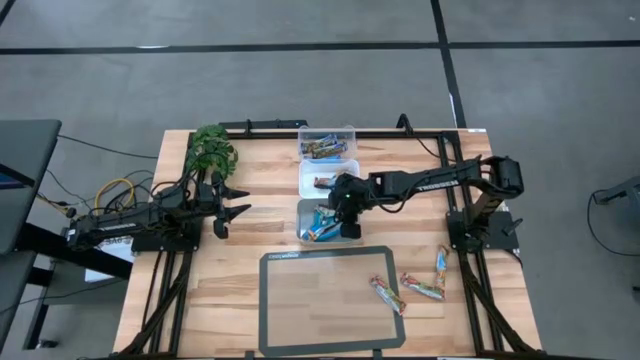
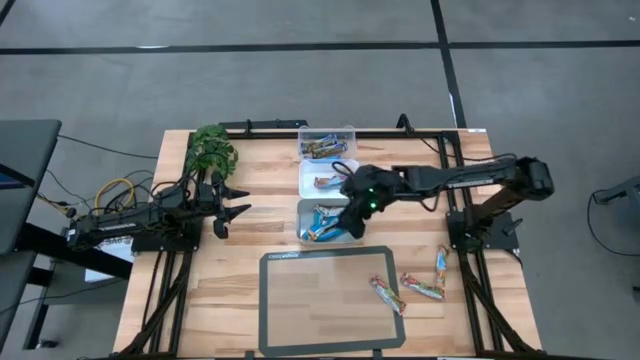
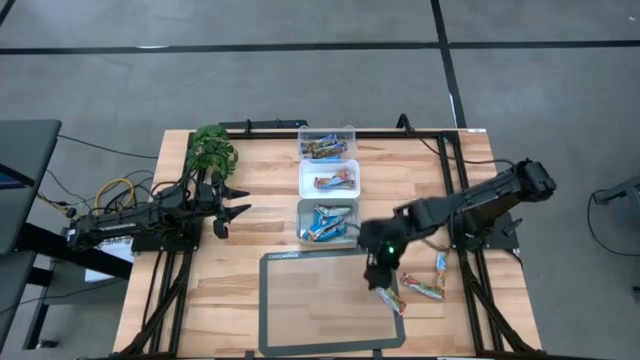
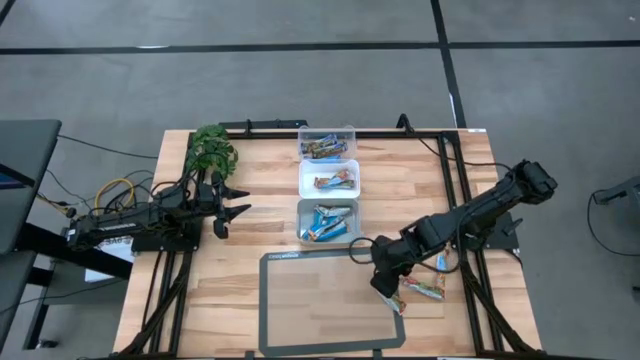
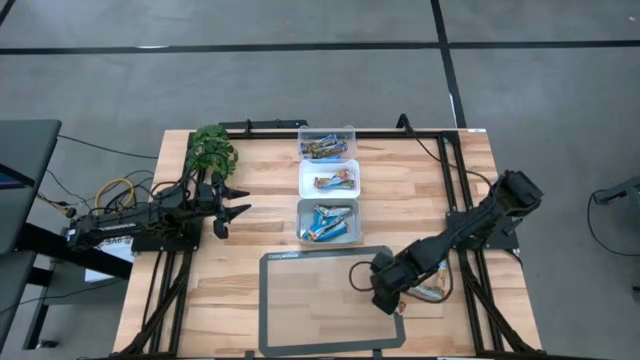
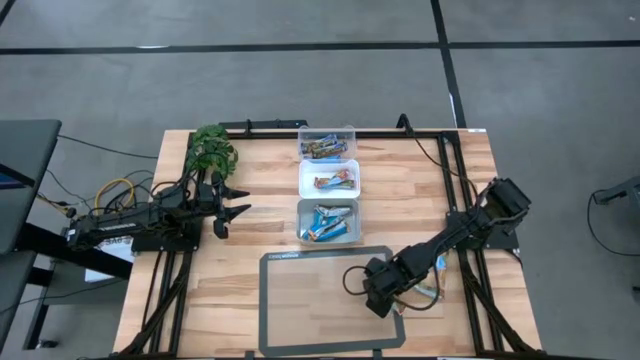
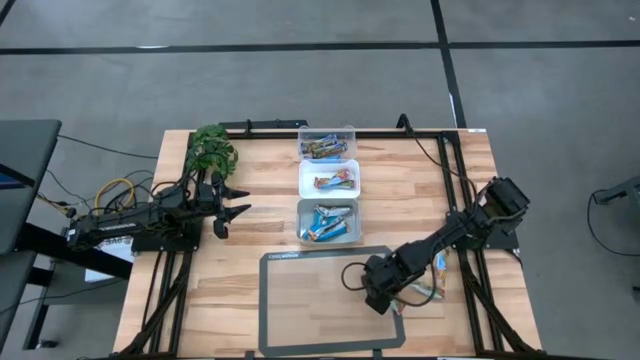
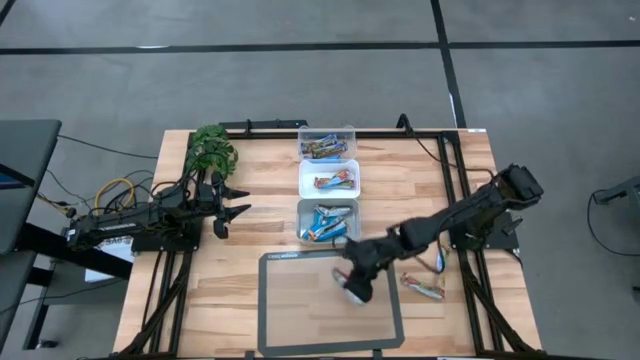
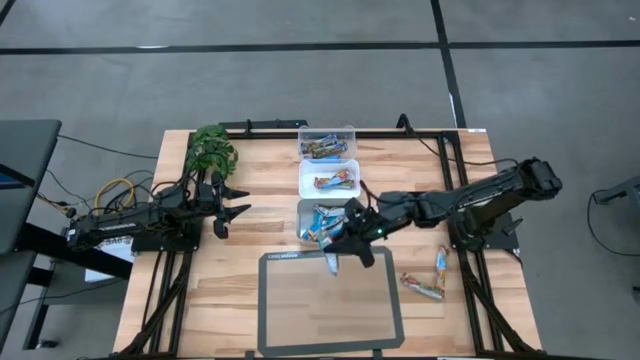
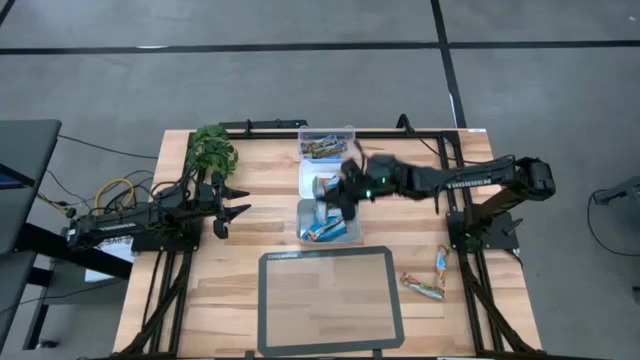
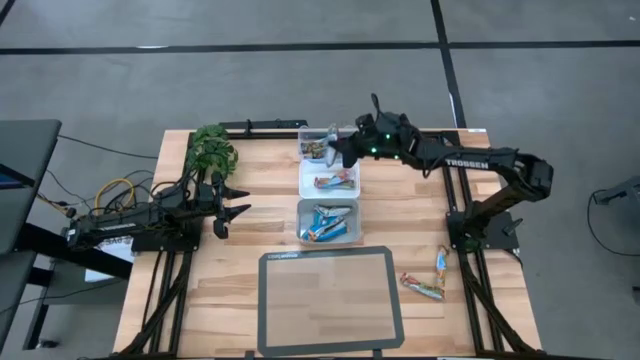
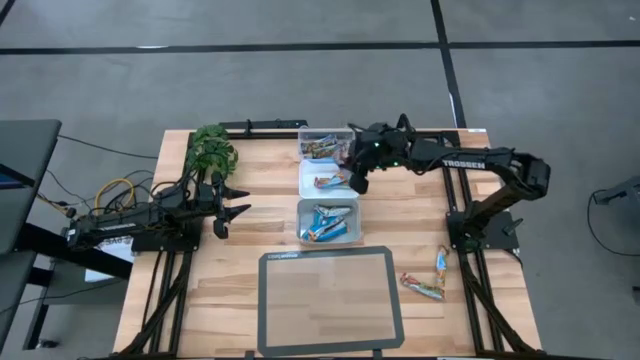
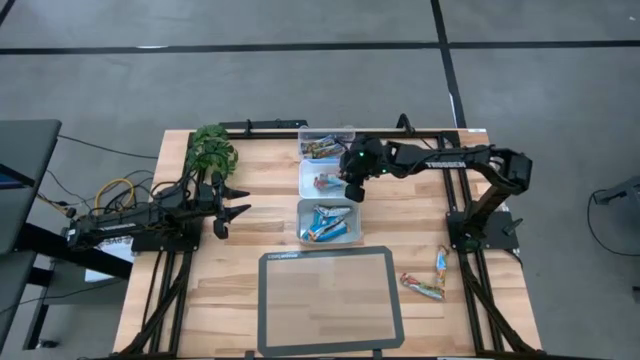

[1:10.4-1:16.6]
Task: Pick and place Granola Bars by type
Put the red granola bar into the white bin

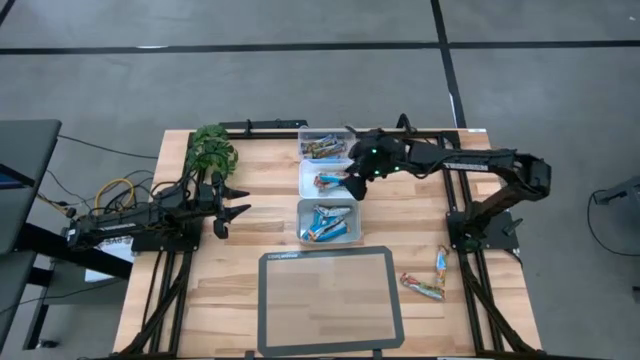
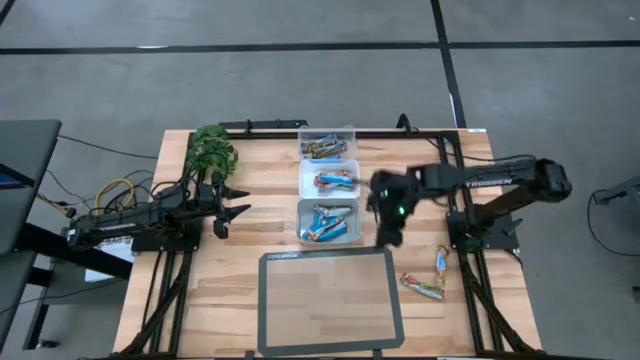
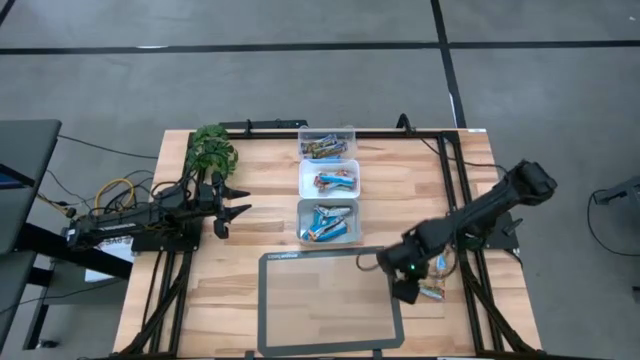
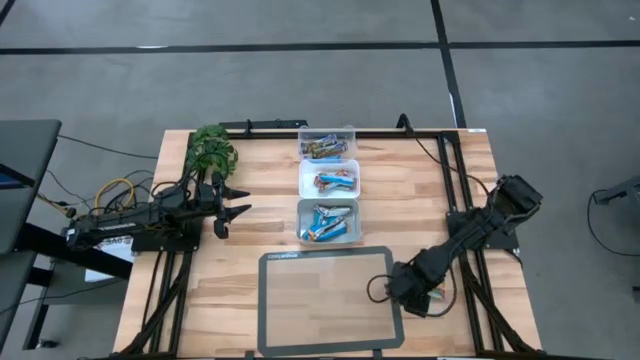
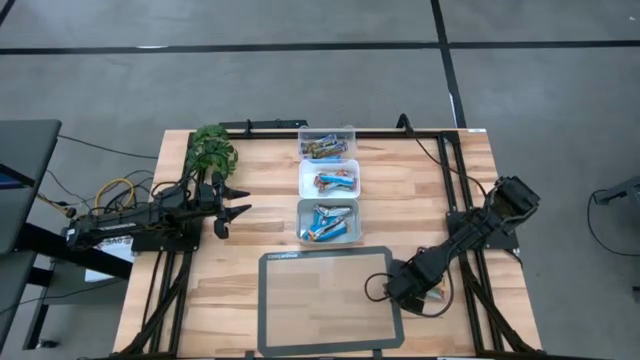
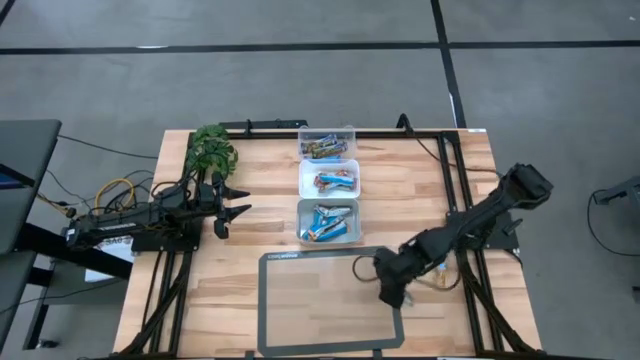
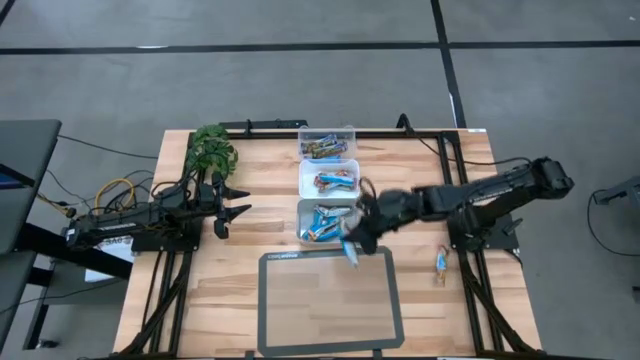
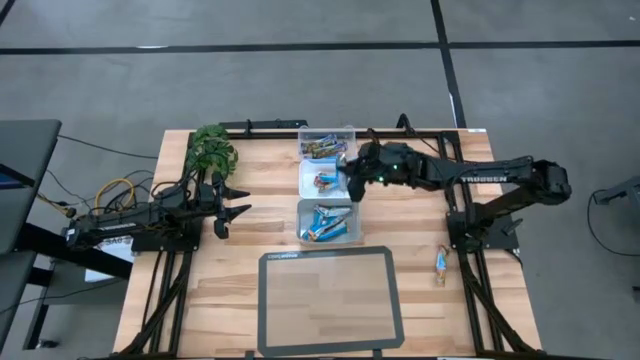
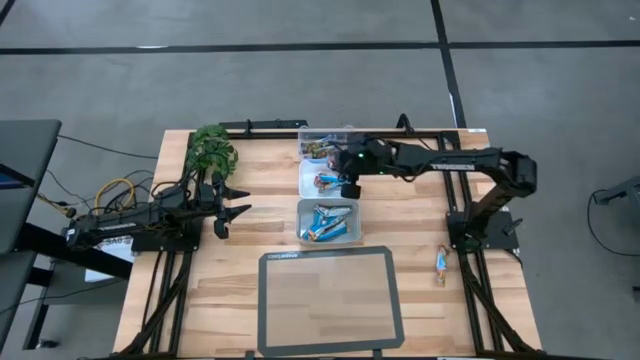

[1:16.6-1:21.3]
Put the red granola bar into the white bin

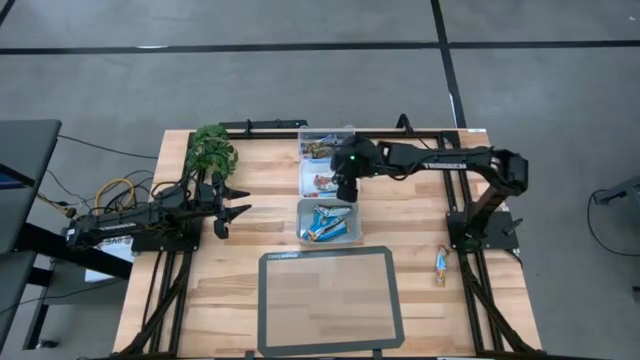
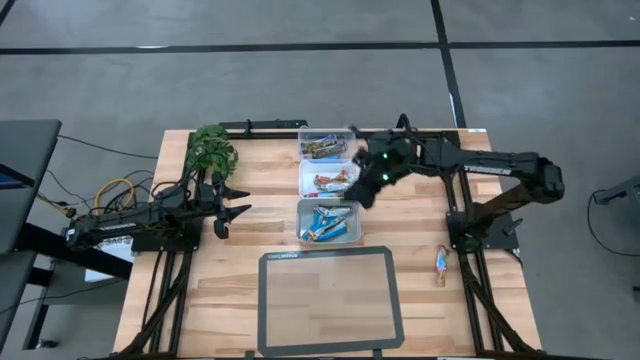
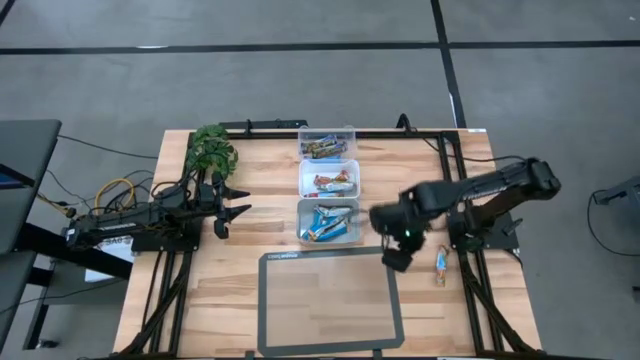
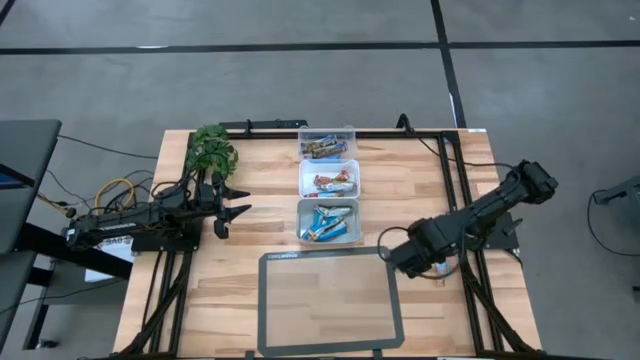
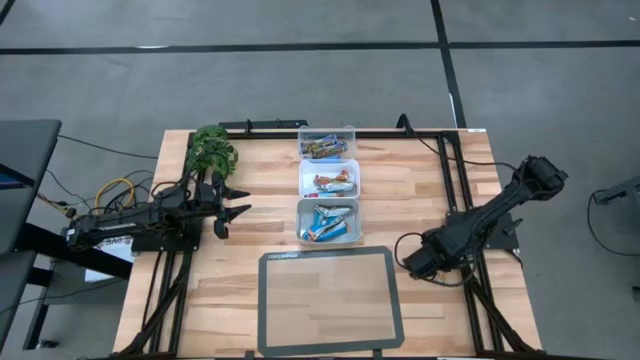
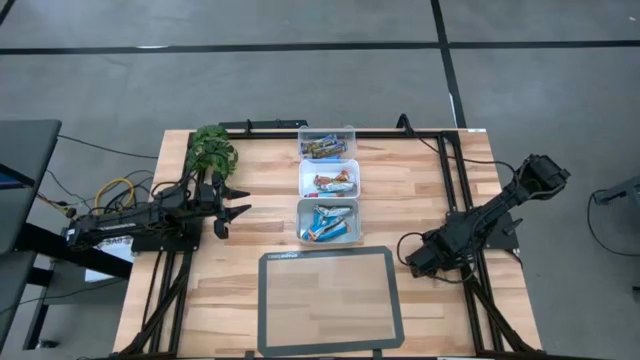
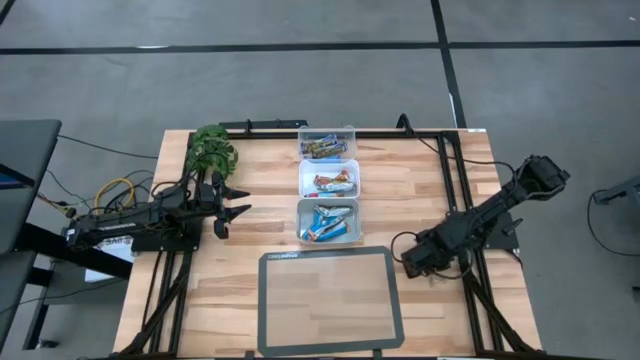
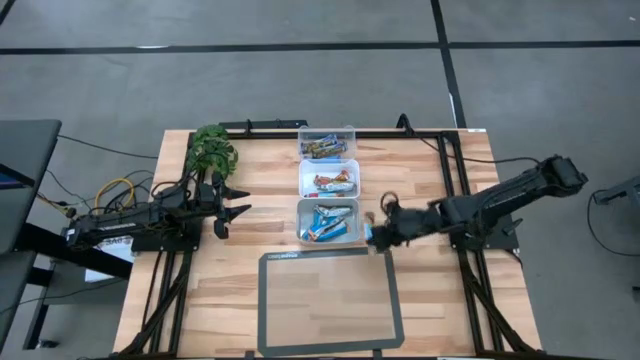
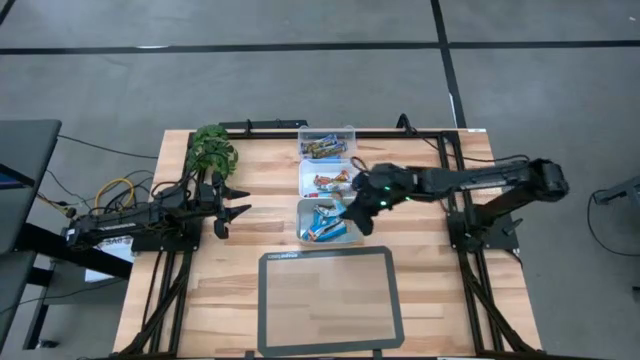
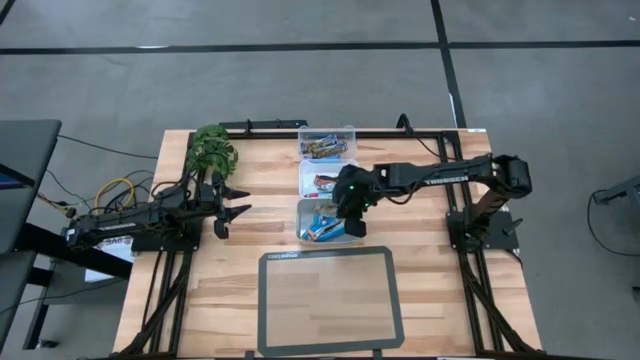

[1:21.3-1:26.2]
Put the orange granola bar into the gray bin

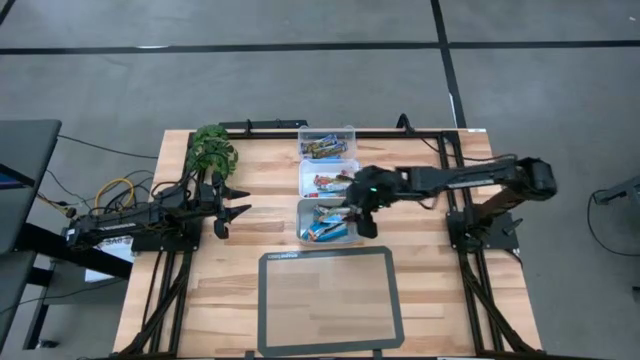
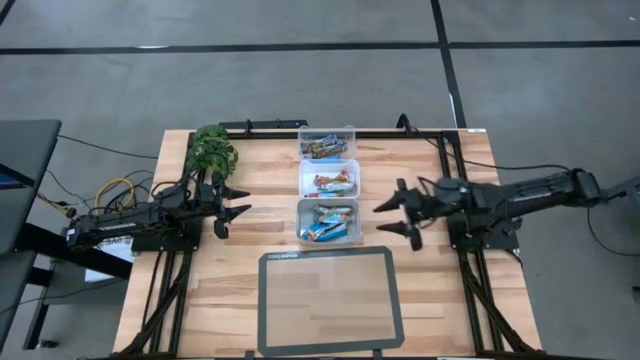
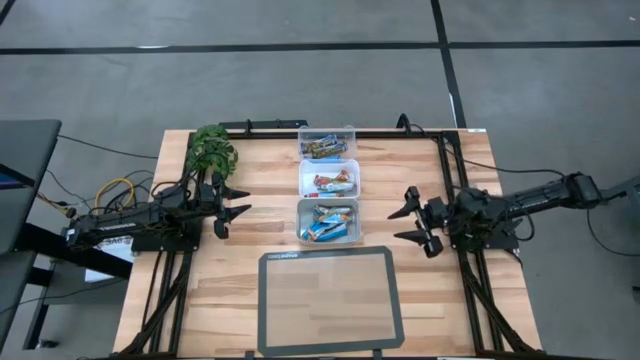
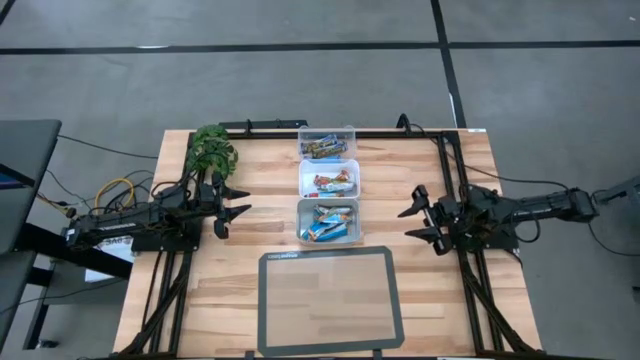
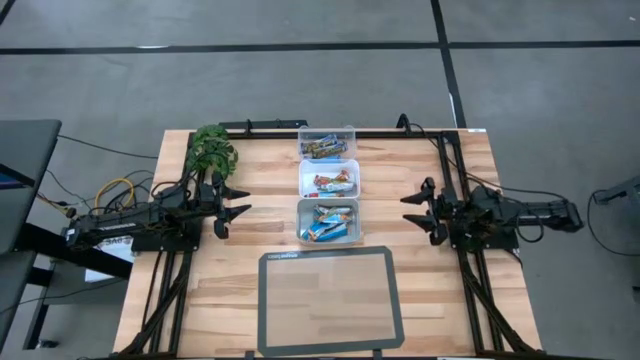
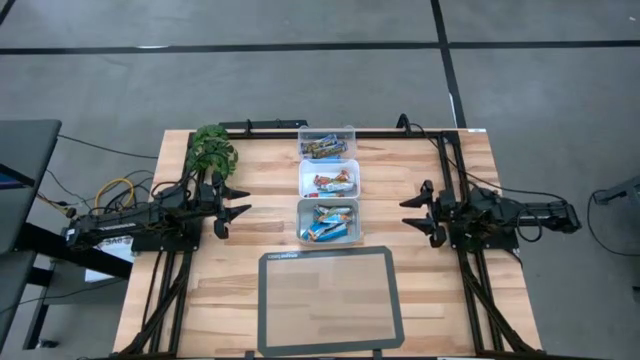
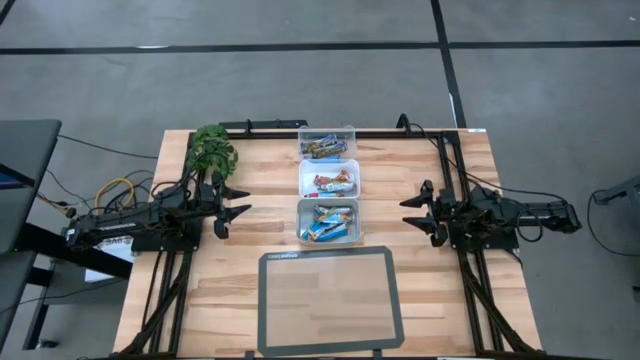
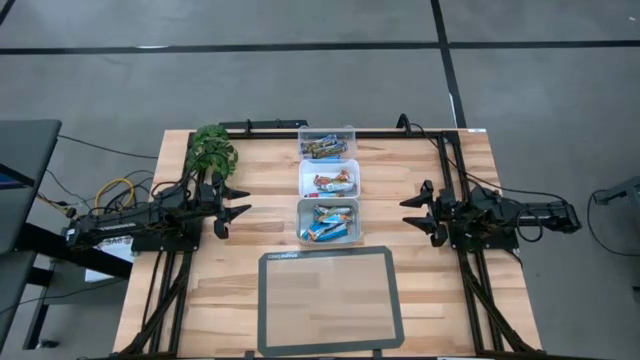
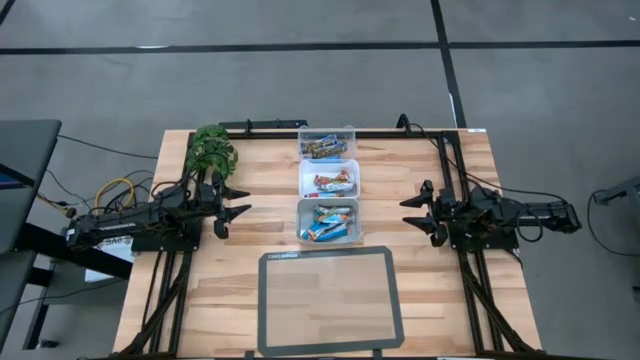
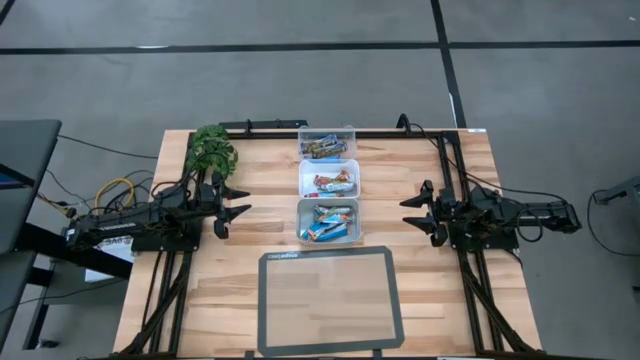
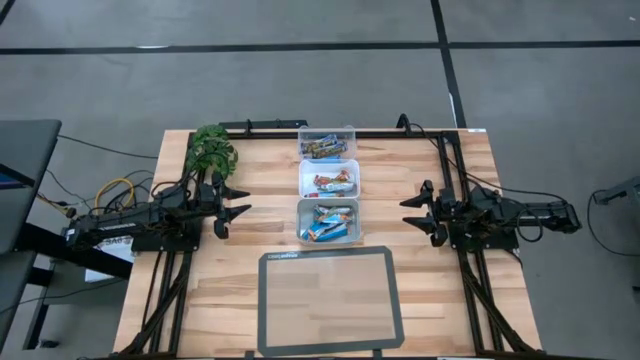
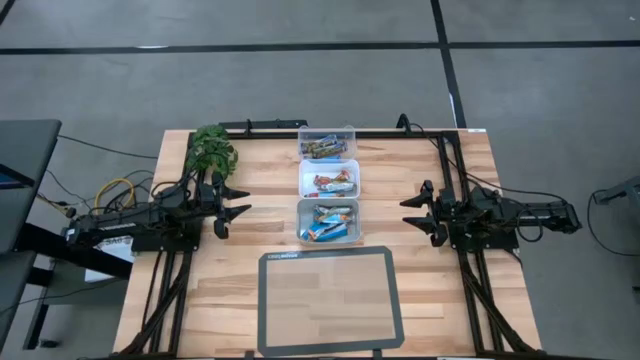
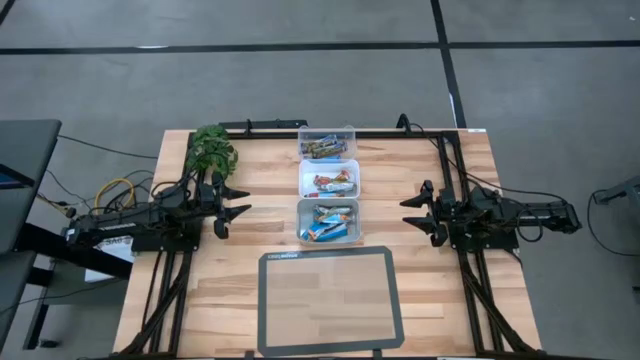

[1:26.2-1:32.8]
Return to Home Position
